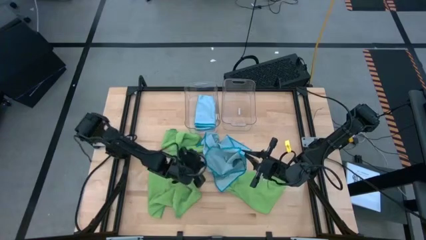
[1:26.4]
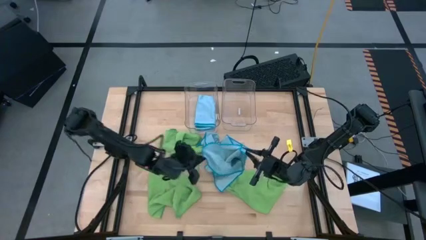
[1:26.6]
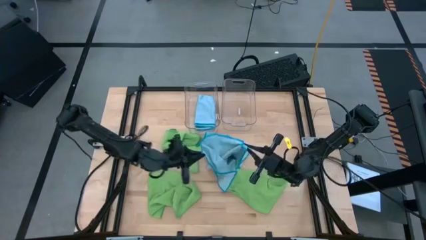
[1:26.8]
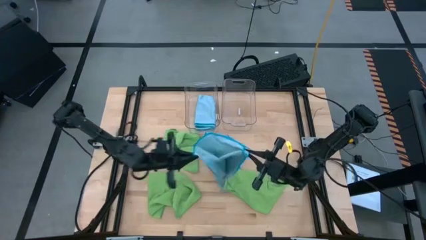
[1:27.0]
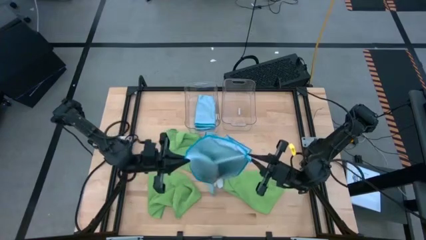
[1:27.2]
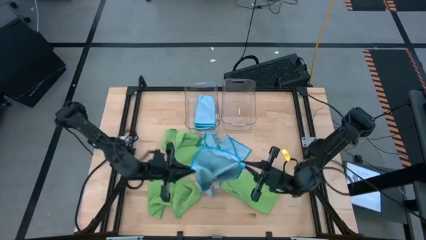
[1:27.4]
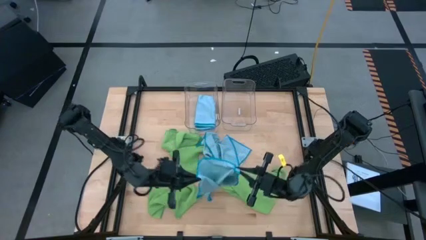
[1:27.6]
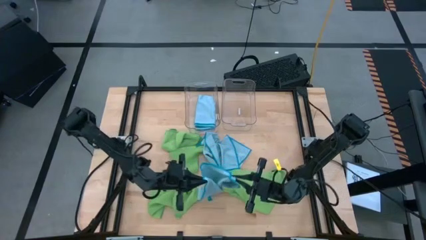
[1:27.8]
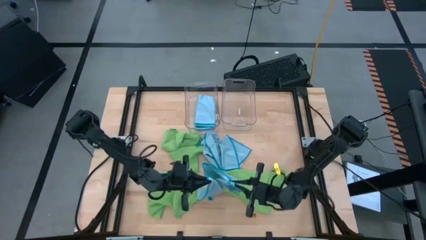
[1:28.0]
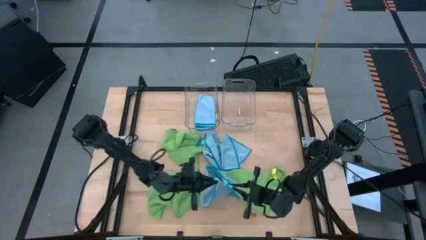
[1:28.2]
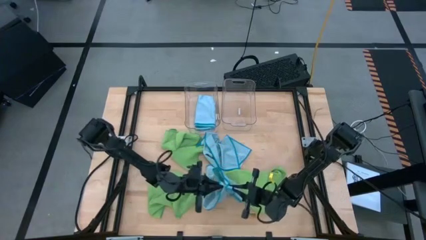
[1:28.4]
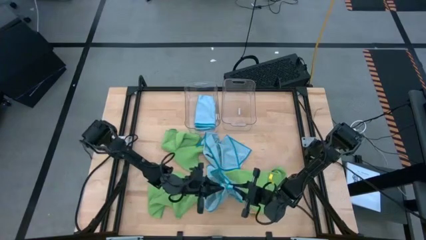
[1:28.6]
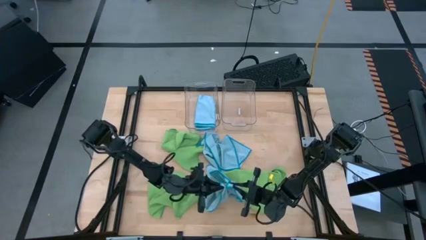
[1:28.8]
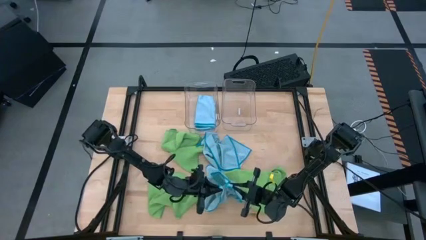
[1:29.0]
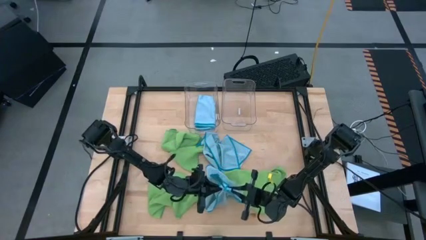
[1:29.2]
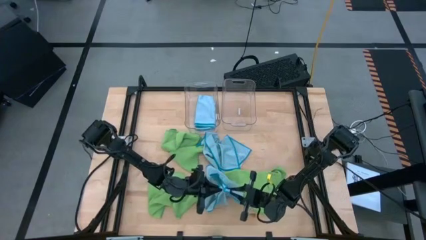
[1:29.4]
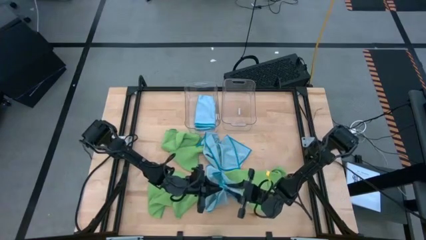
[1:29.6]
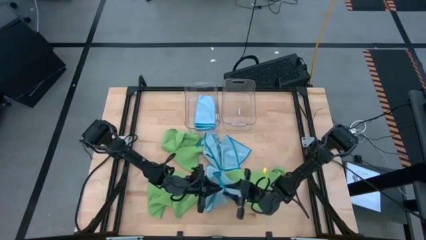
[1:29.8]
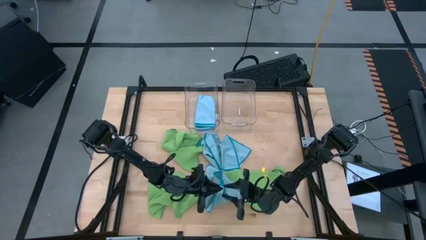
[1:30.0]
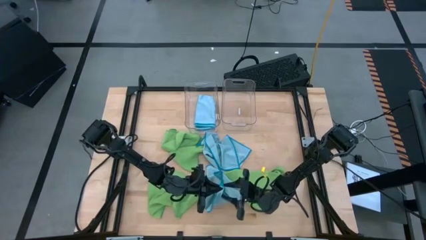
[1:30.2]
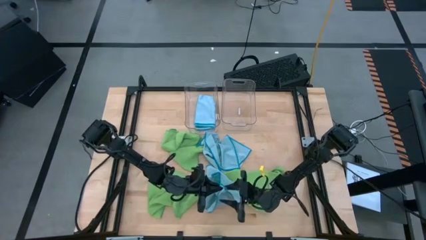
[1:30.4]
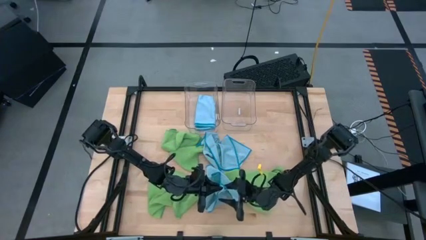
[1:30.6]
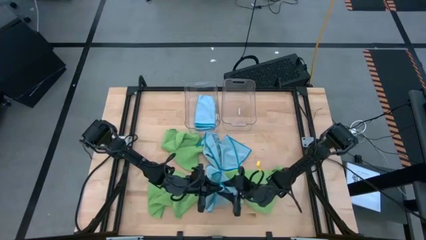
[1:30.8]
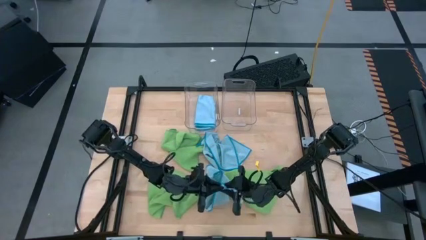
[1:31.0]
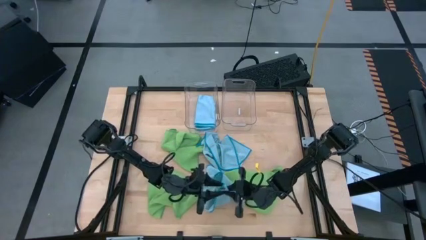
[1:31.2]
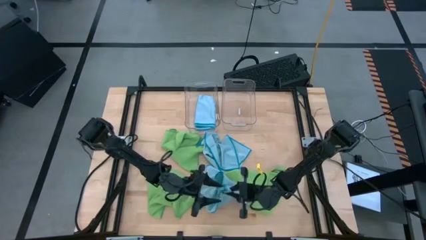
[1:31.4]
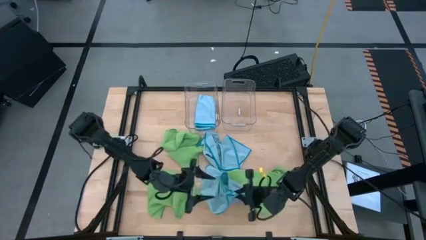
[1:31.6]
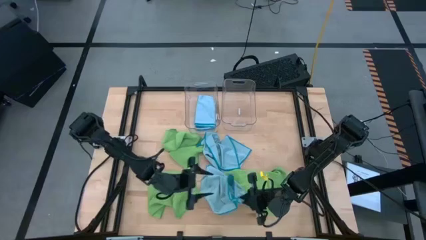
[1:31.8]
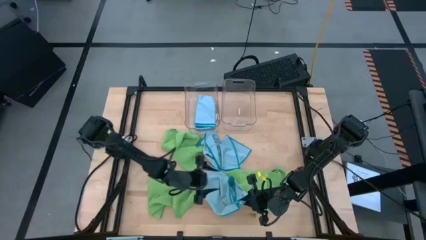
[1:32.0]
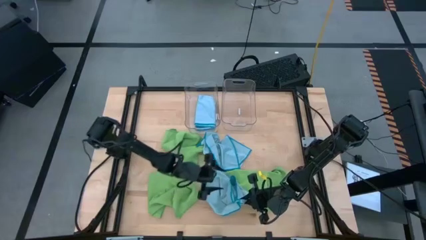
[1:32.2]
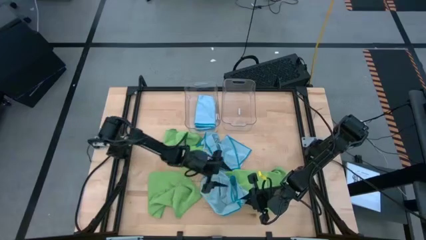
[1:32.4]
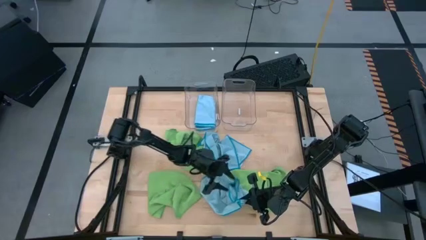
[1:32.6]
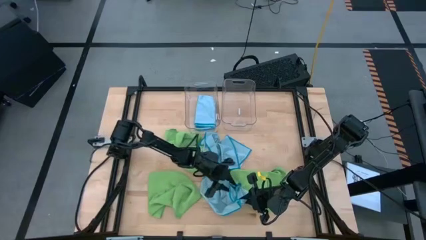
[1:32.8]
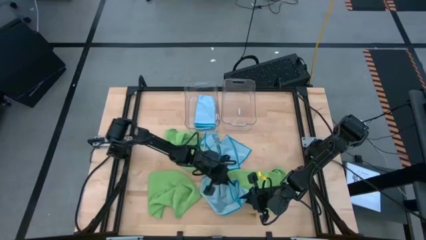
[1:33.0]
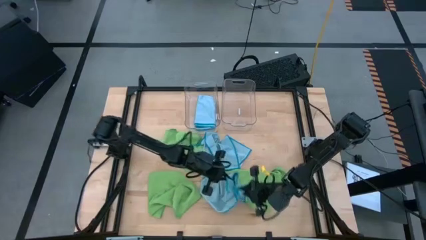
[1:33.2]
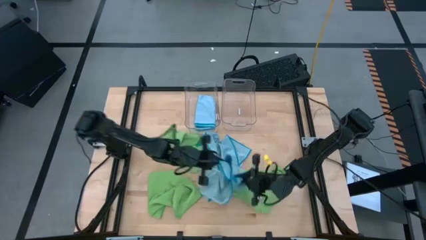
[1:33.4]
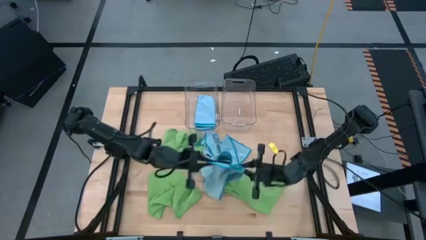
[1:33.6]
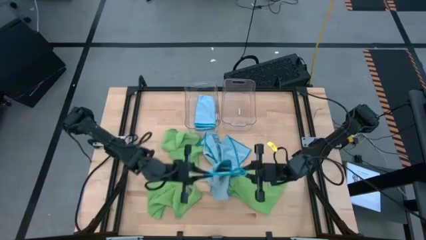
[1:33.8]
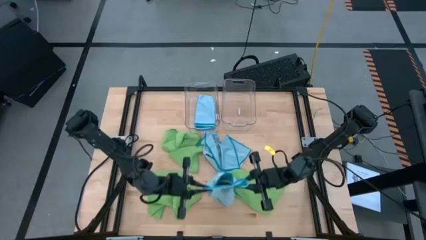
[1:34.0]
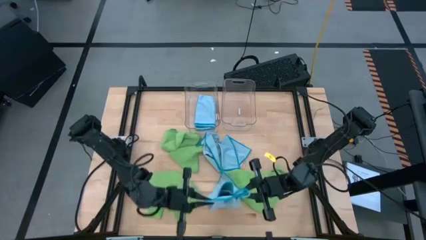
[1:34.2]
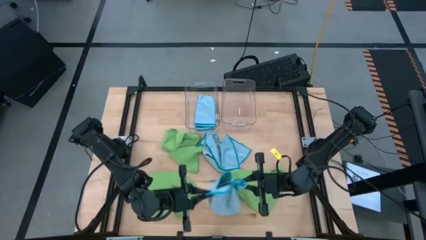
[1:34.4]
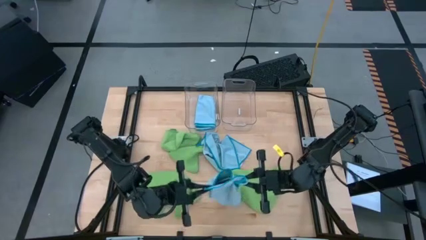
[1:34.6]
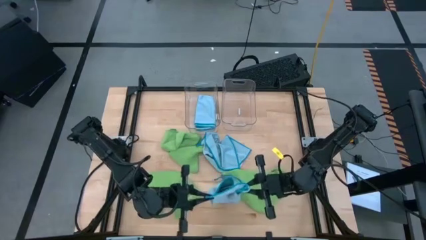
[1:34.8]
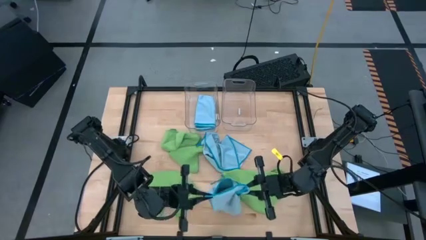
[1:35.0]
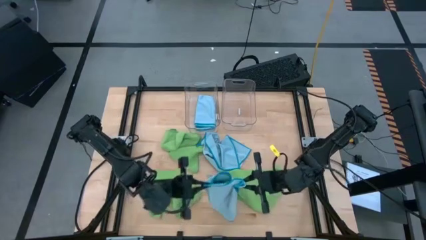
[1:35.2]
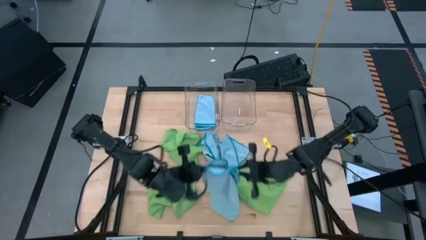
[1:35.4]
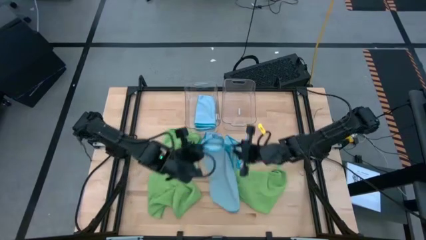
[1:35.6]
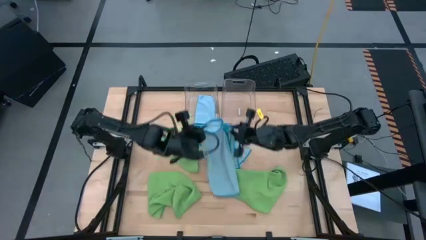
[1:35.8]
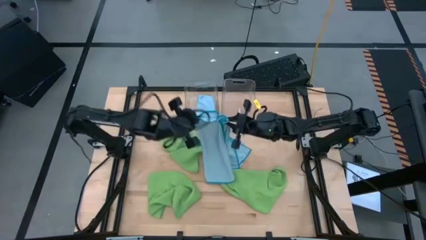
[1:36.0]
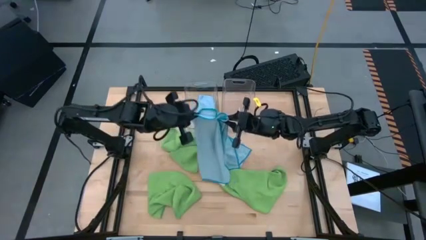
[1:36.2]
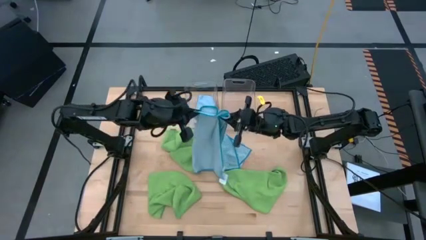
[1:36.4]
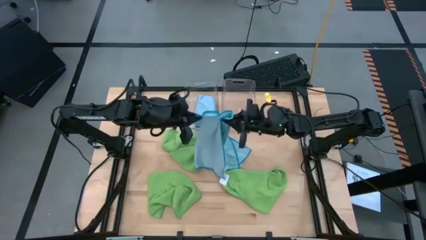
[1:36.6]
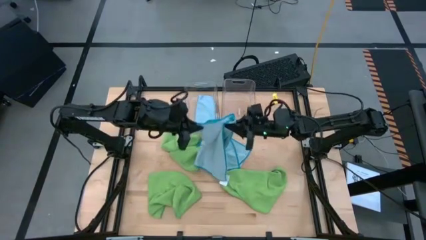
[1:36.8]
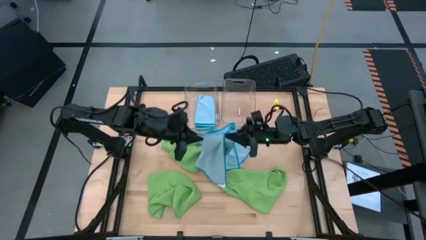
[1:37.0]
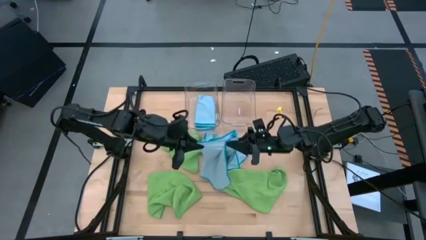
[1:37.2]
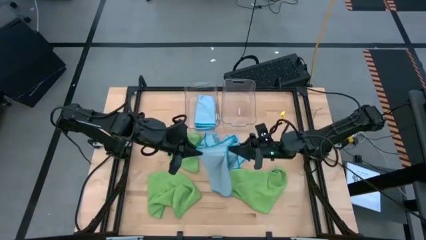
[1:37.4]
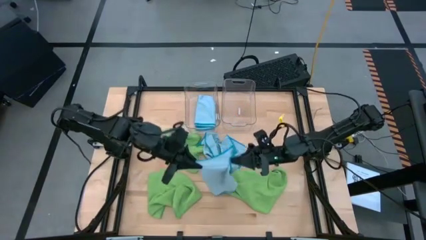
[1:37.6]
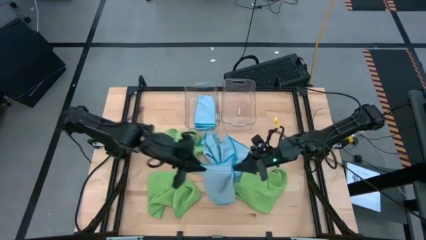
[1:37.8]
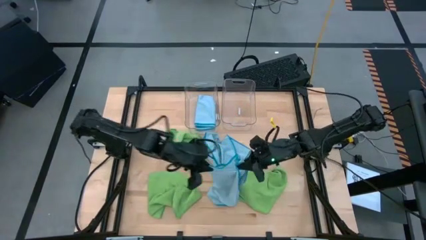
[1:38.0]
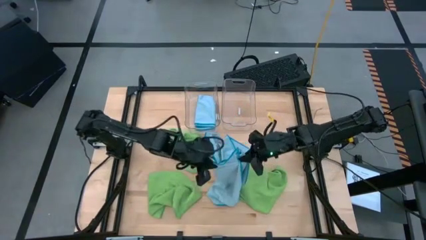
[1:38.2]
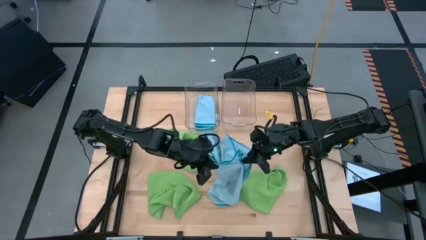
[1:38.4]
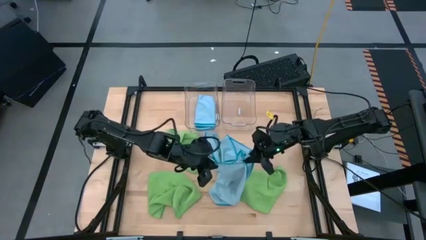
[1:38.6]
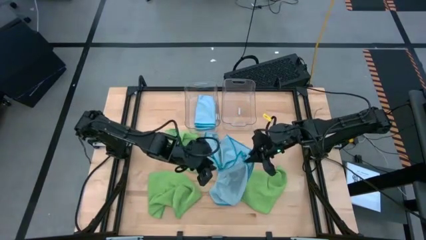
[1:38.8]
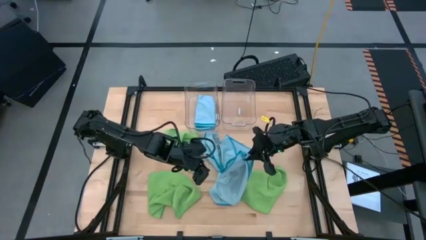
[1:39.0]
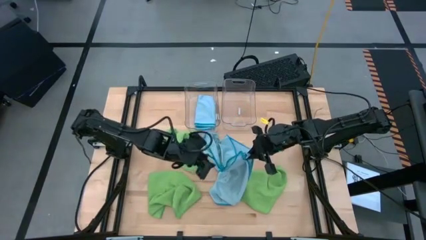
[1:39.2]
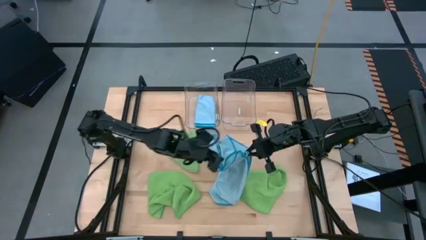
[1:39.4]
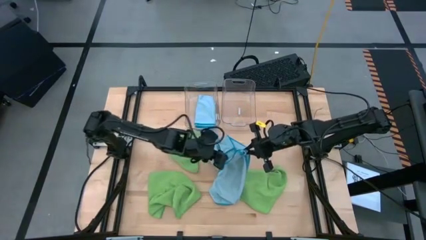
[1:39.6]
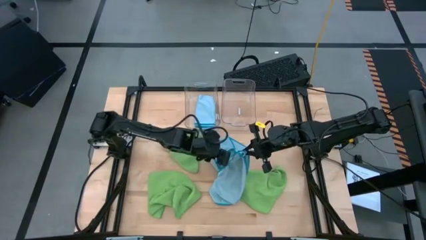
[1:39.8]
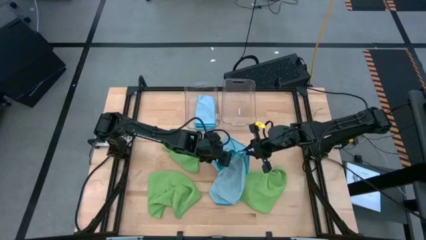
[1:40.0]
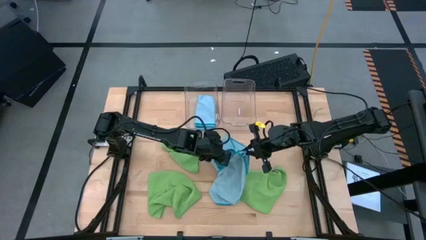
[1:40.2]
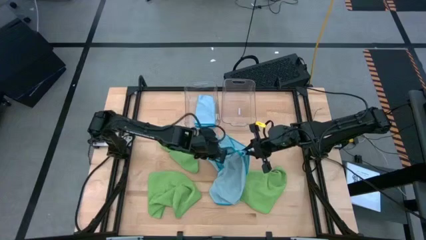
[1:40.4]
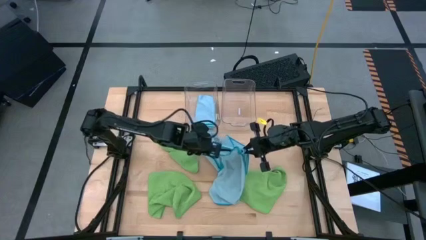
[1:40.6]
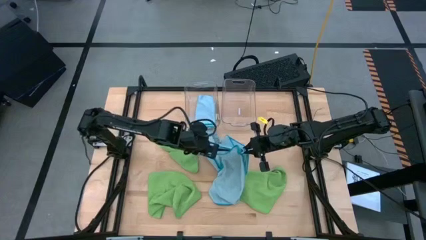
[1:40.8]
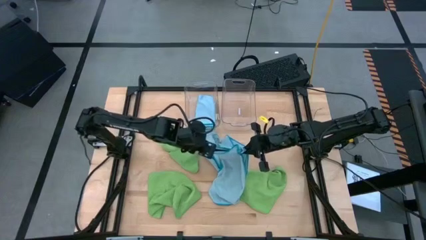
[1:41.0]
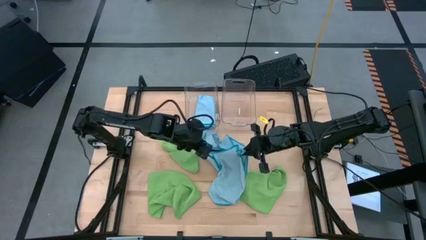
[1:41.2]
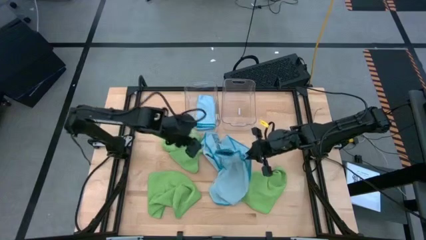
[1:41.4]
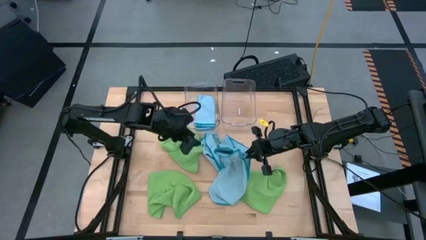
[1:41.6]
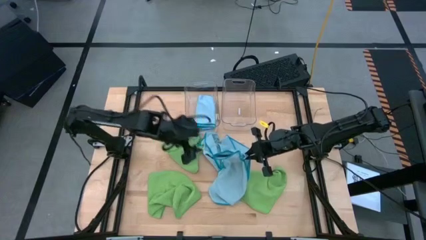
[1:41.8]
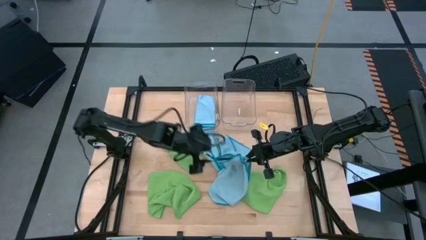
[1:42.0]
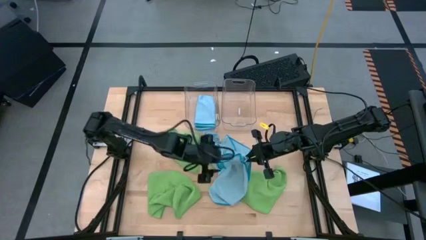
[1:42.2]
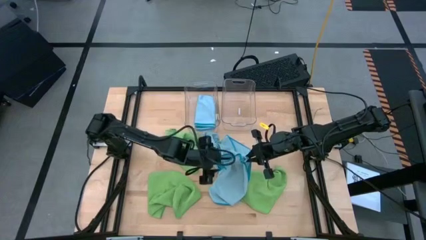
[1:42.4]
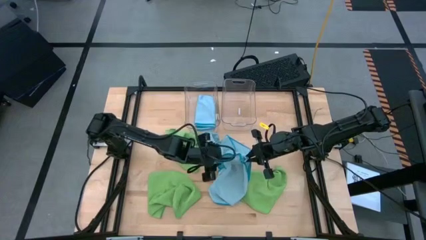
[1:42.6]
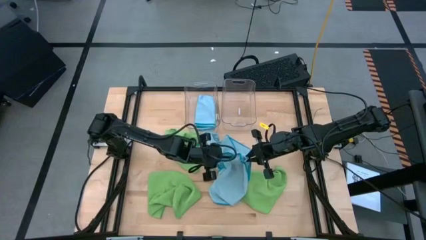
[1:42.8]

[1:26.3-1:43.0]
Task: Fold microfiber towels
Fold the bottom blue microfiber towel
